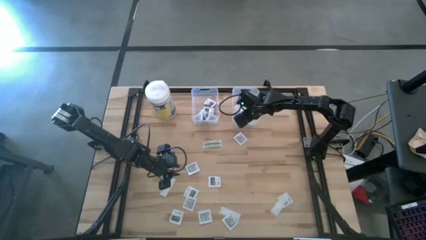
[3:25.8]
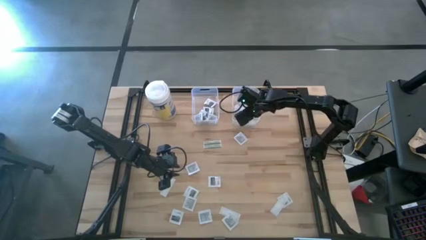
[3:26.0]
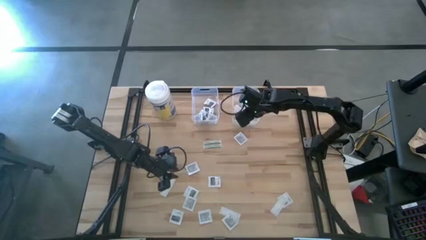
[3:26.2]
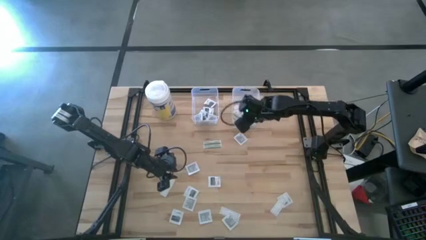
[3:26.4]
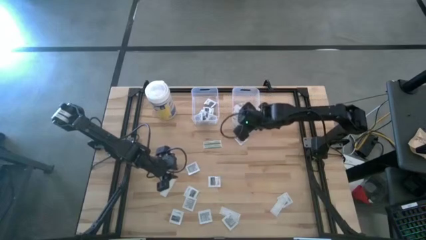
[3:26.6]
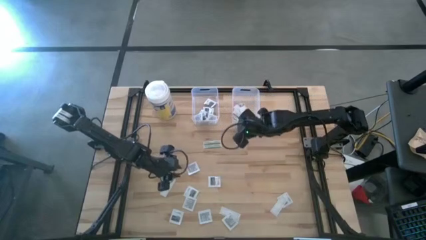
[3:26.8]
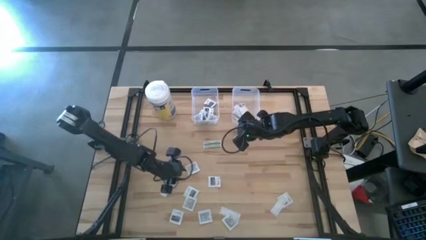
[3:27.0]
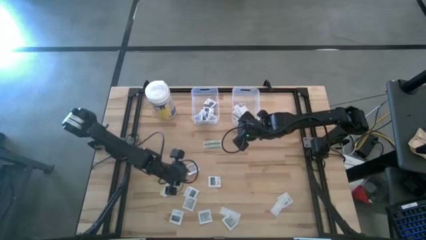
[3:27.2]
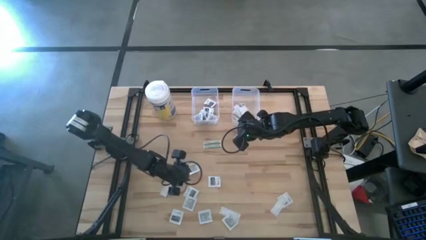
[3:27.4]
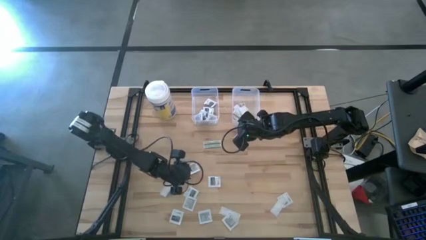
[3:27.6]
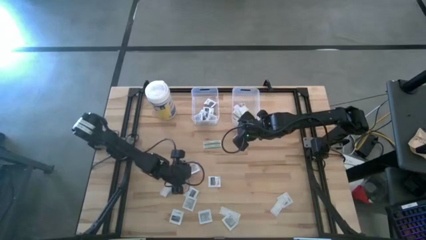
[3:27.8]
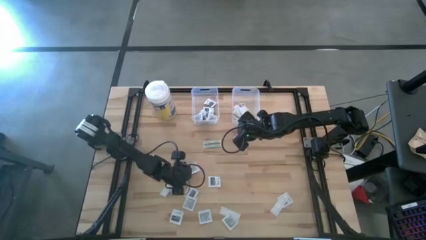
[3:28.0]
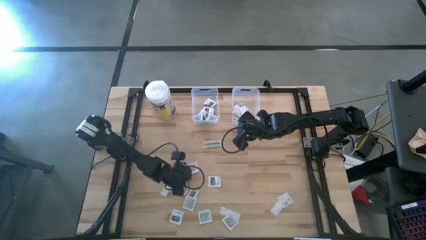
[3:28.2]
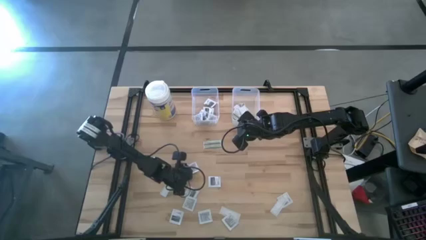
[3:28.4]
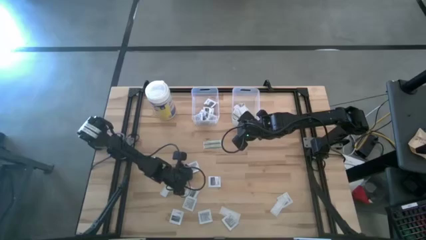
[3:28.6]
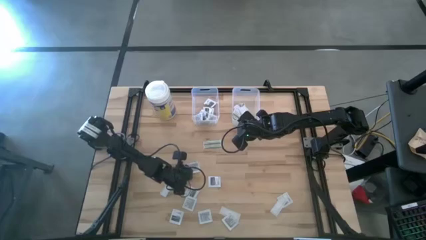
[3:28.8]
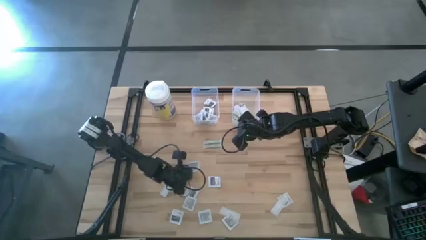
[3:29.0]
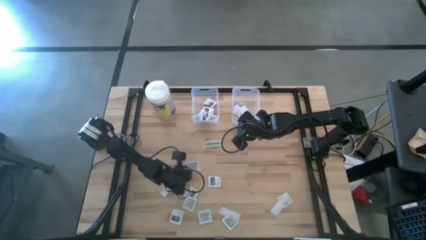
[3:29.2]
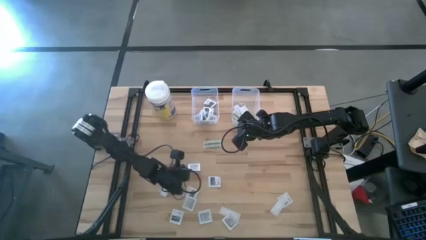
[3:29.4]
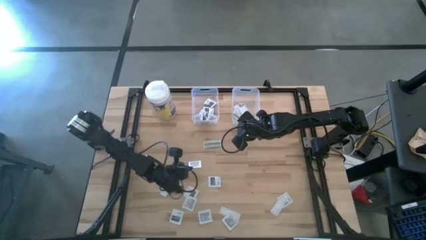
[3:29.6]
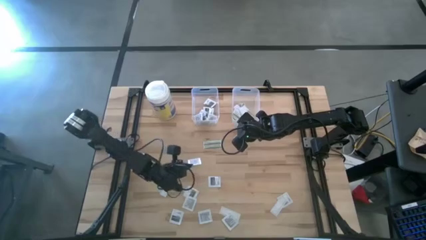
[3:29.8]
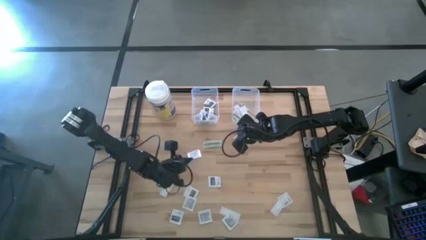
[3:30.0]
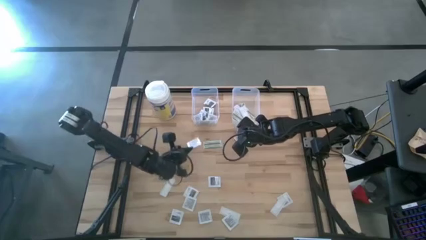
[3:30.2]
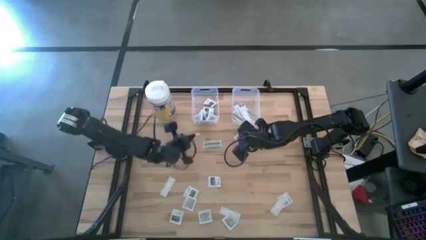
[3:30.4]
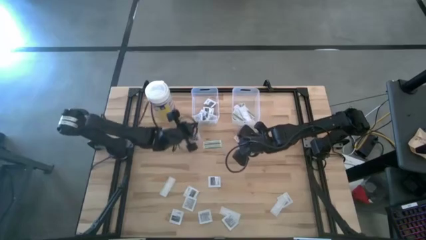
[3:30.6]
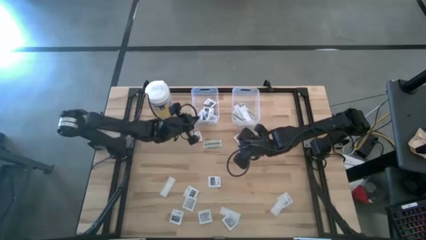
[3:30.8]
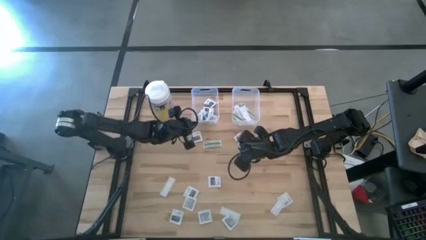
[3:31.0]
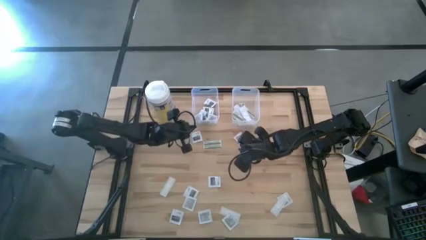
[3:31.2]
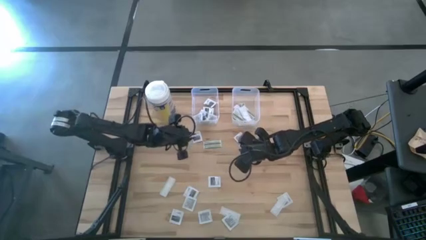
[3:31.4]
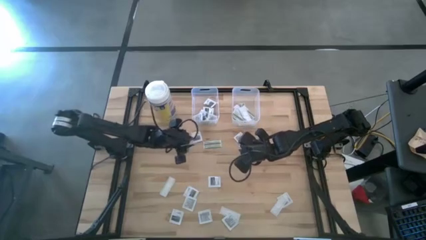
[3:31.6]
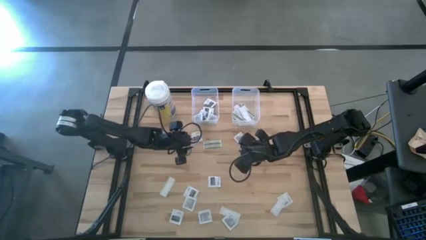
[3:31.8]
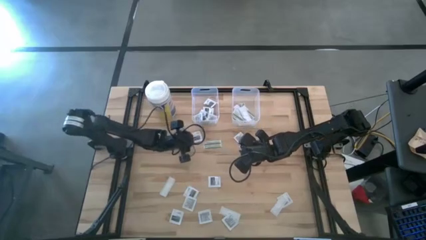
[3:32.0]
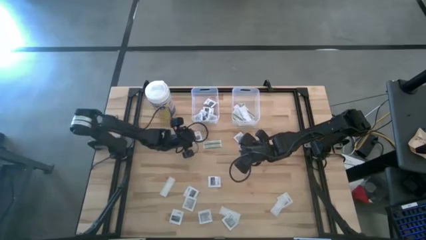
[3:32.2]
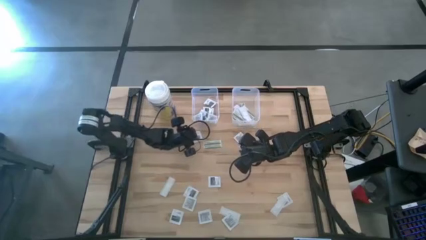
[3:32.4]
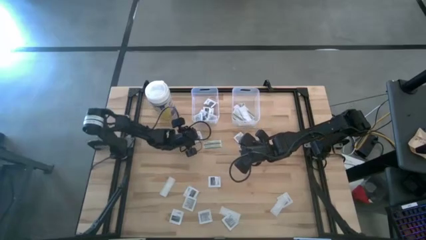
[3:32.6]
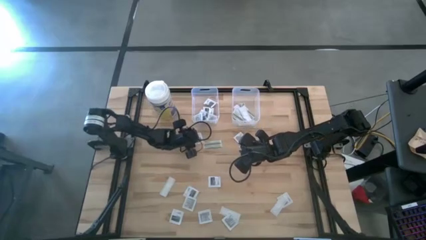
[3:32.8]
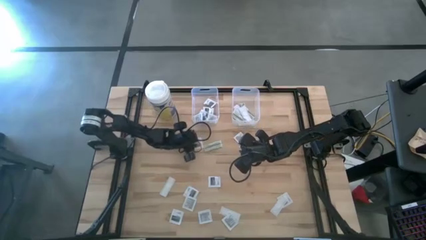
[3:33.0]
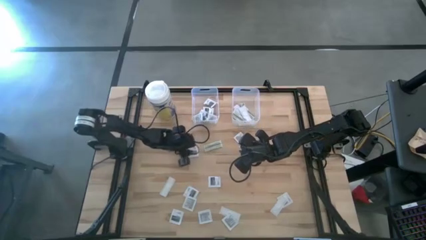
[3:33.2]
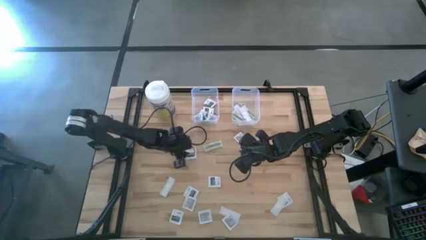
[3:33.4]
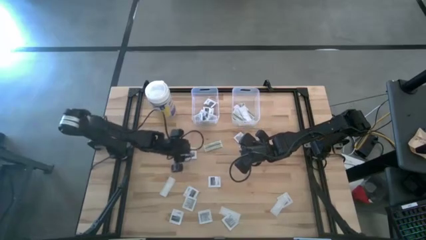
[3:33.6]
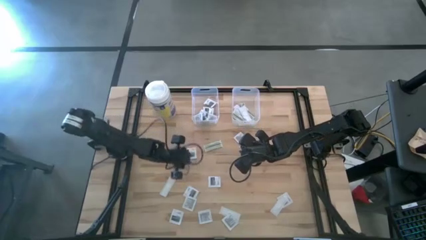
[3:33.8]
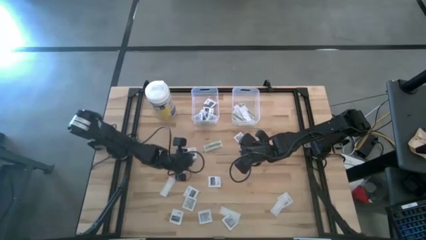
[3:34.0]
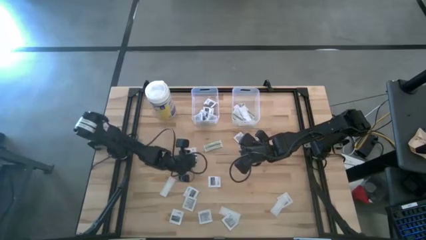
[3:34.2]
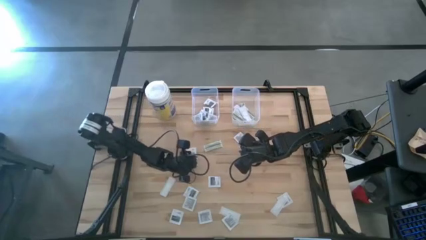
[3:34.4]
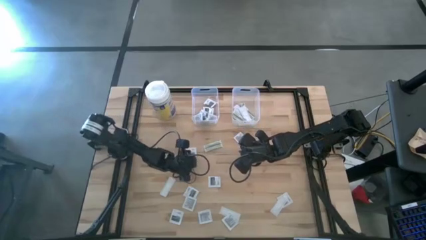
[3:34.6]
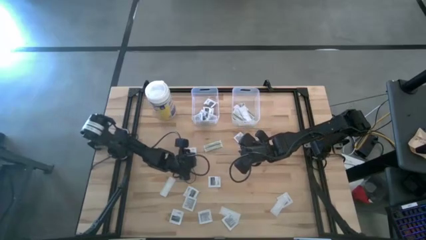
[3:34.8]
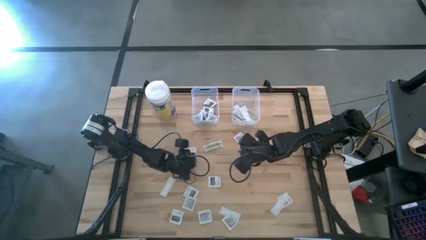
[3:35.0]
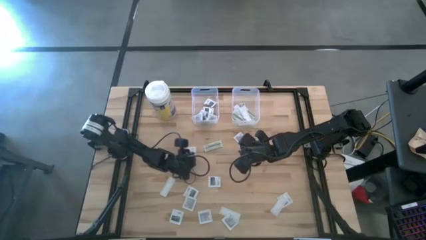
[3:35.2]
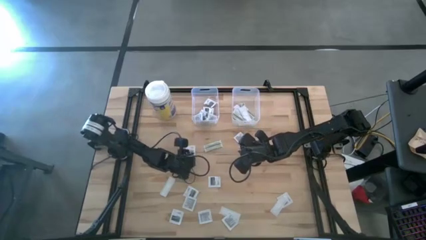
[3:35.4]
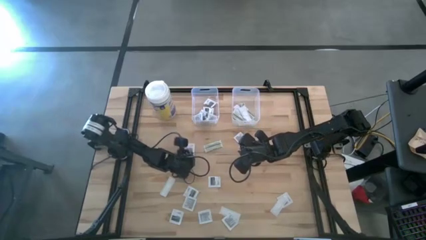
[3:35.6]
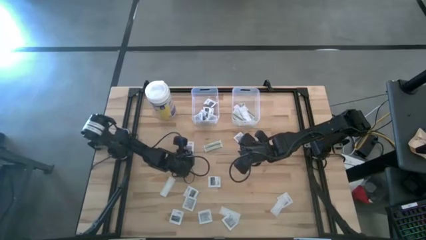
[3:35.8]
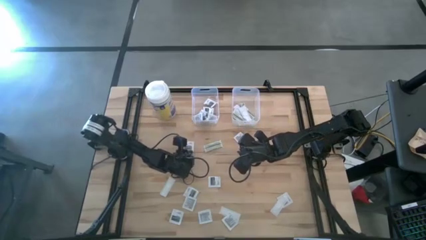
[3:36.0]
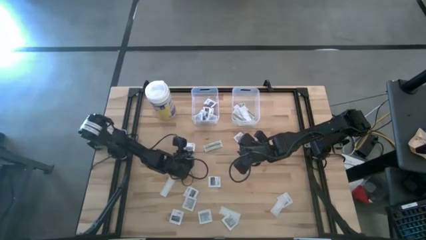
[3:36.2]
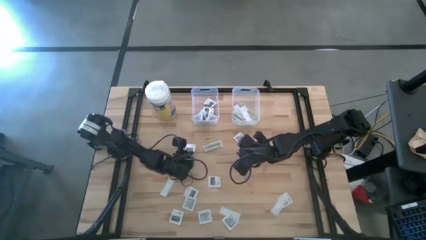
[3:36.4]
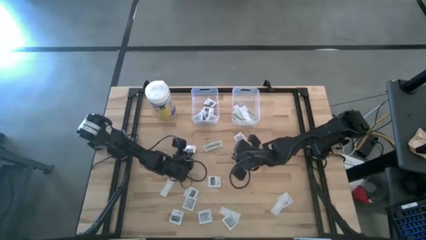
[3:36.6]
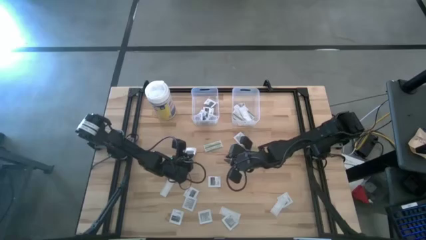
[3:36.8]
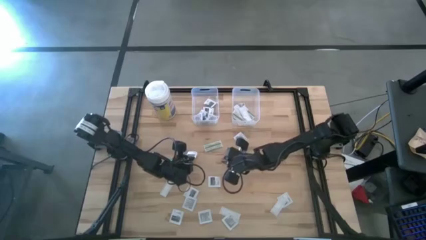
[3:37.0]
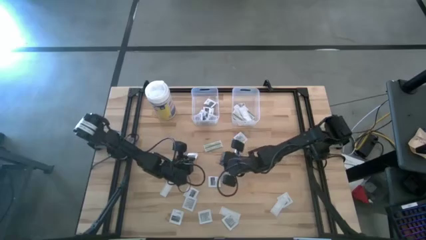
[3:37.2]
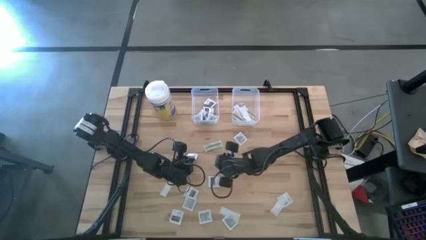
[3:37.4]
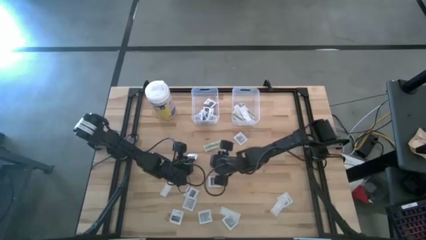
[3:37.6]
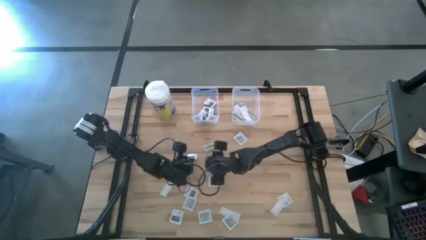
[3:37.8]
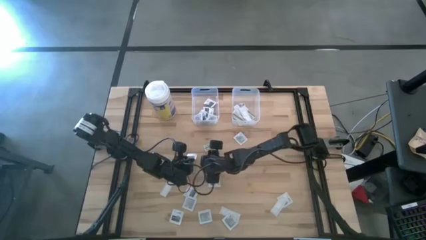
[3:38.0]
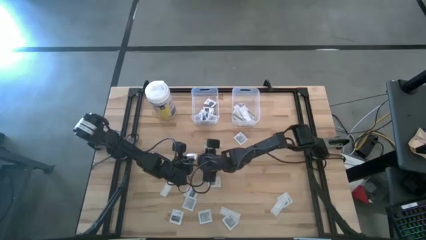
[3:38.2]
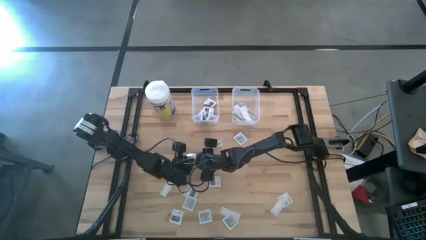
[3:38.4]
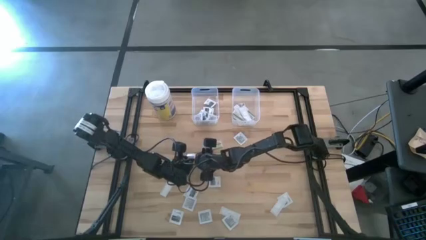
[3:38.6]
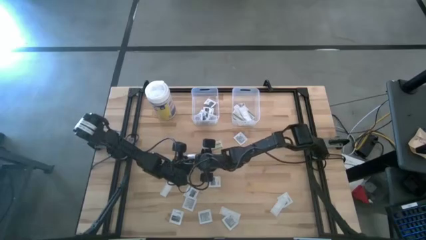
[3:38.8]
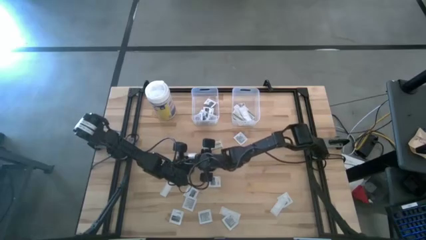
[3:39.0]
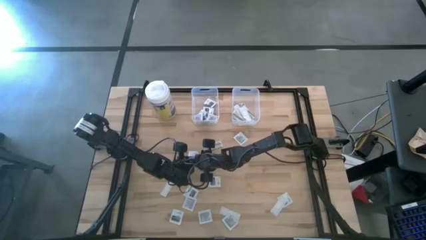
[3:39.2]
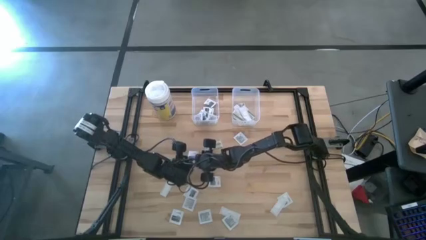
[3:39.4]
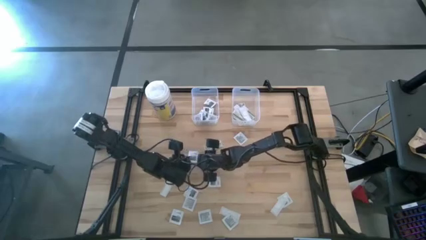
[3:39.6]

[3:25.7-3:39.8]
Task: Pick & Place First Aid Supplies
Put the towelette pack into the left transparent bin

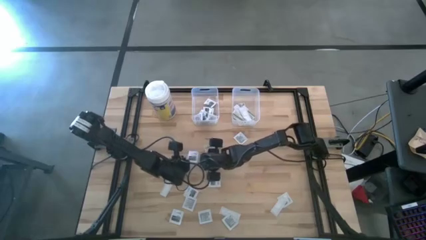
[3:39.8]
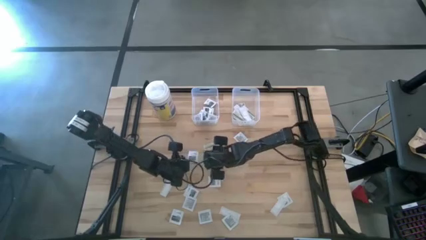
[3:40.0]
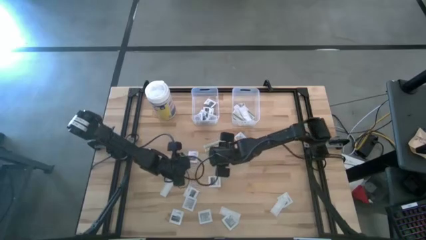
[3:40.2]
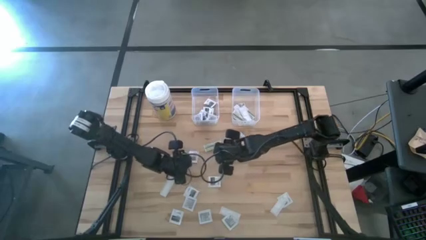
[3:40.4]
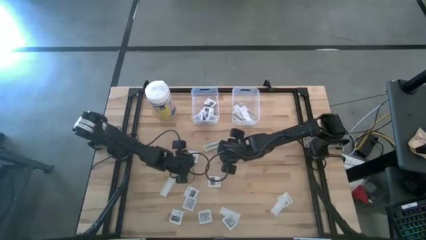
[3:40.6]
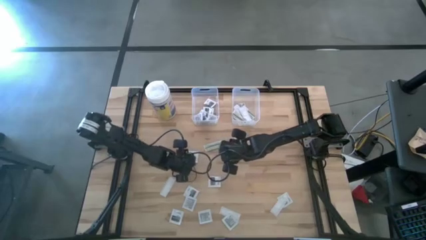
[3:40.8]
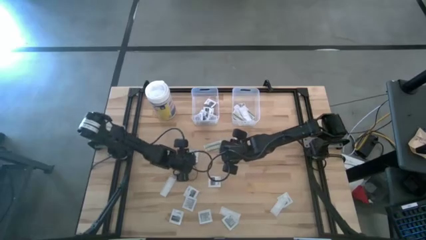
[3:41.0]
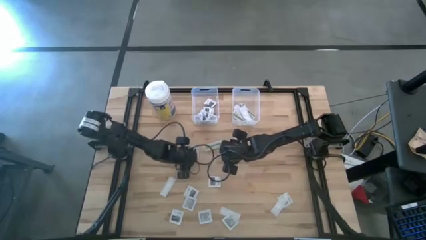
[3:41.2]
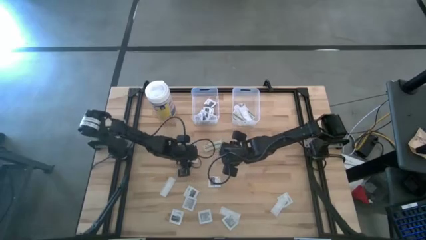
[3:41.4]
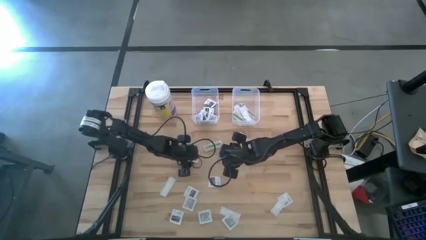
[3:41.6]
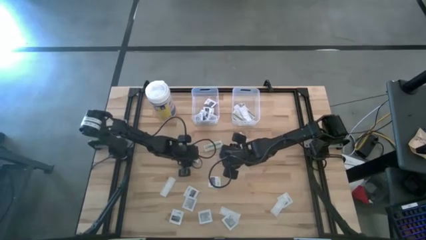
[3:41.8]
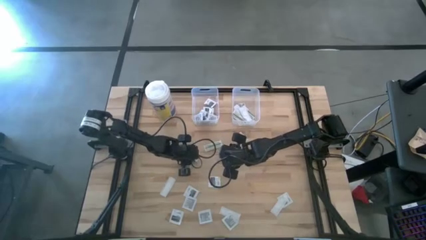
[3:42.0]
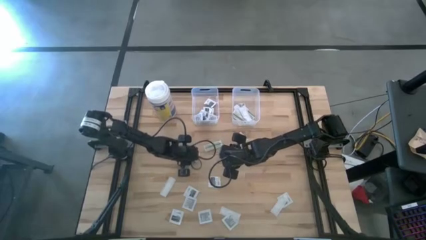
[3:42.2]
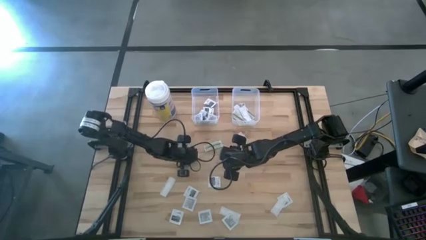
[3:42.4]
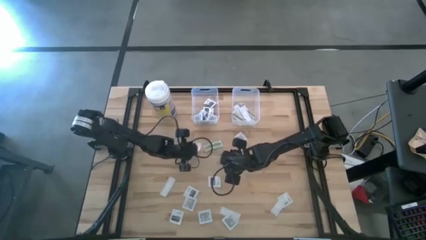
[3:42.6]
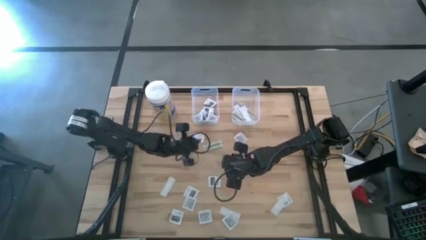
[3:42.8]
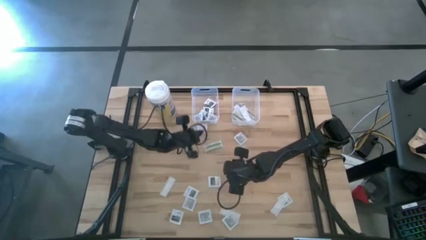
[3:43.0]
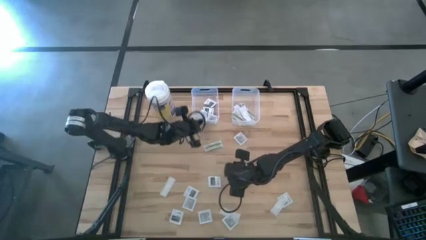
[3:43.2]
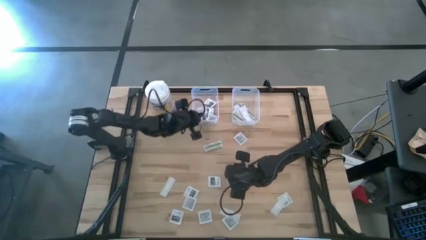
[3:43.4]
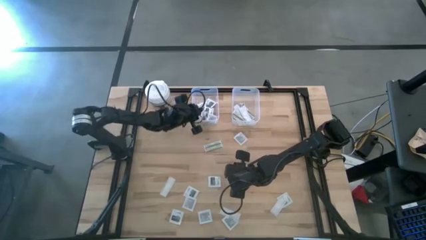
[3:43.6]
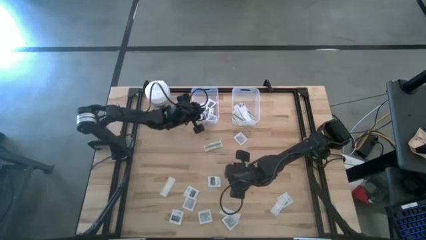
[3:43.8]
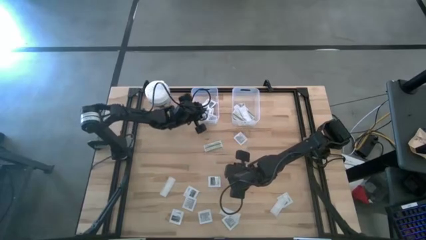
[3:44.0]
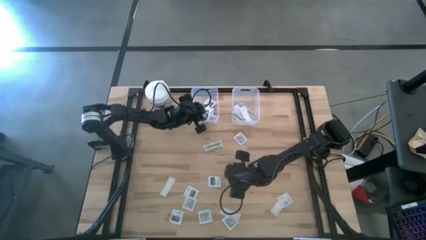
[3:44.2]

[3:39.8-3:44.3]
Put the towelette pack into the left transparent bin
